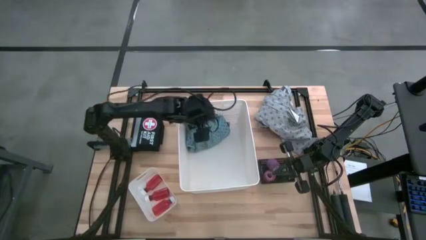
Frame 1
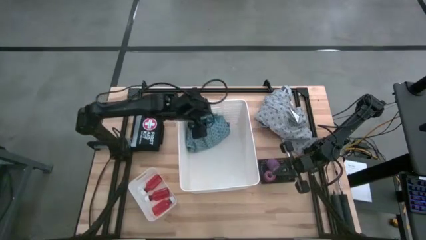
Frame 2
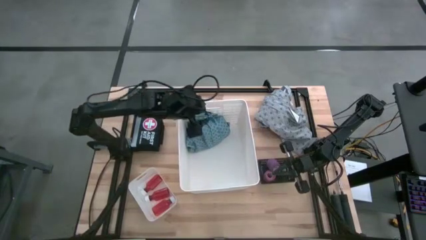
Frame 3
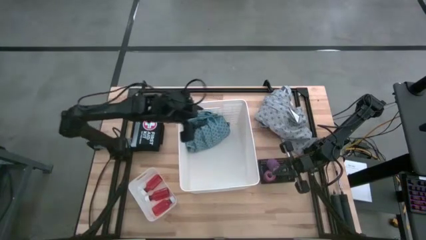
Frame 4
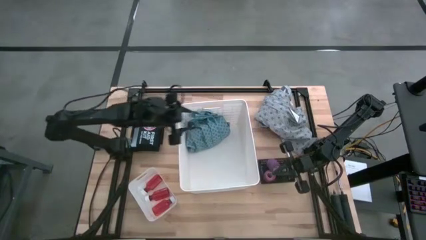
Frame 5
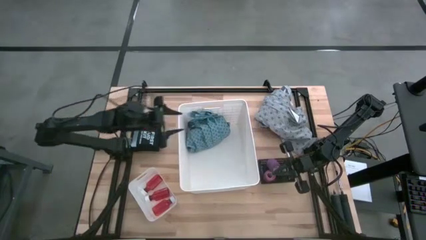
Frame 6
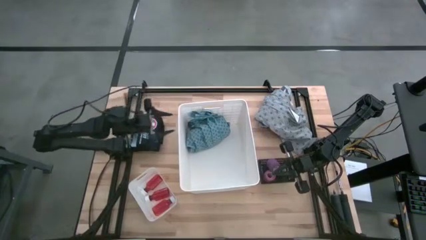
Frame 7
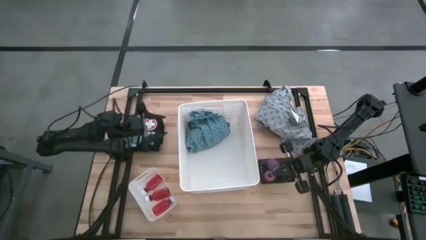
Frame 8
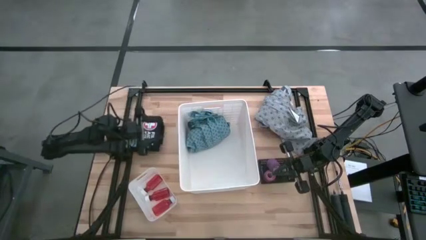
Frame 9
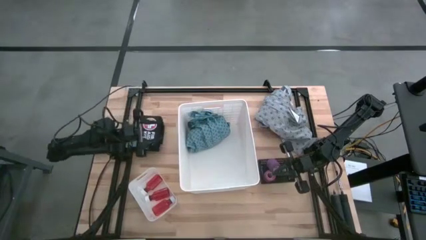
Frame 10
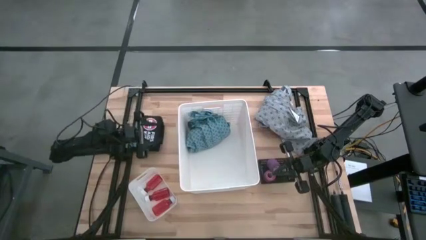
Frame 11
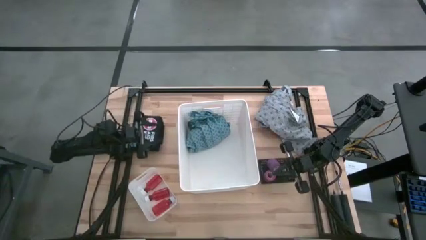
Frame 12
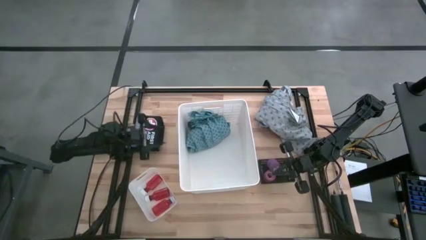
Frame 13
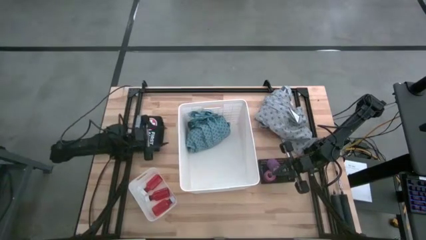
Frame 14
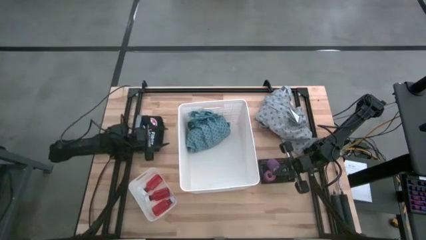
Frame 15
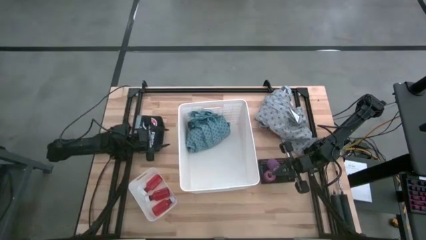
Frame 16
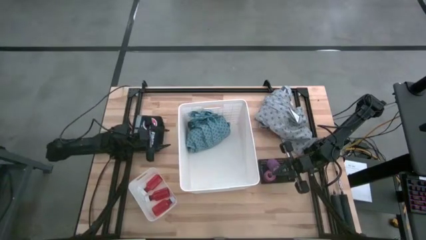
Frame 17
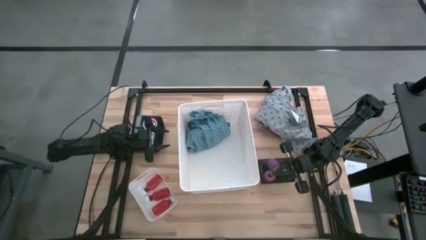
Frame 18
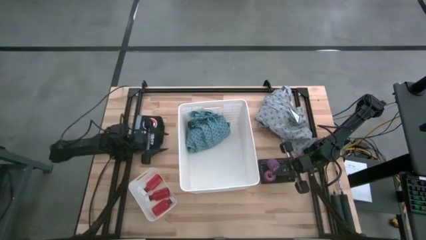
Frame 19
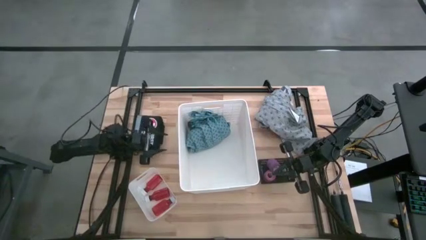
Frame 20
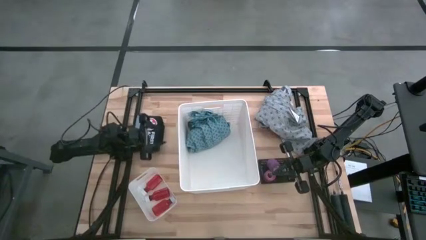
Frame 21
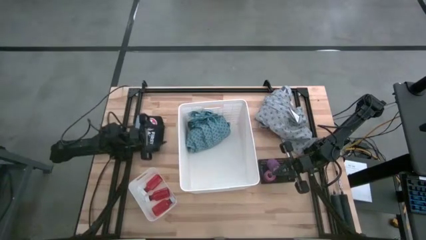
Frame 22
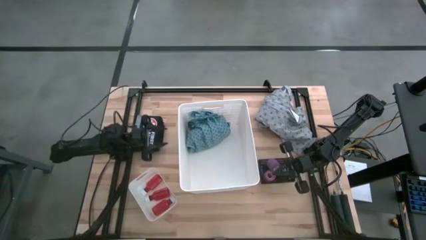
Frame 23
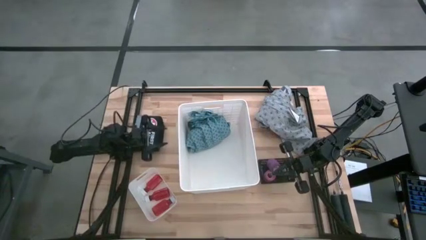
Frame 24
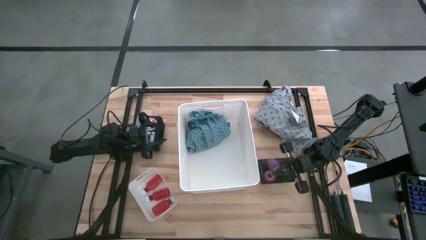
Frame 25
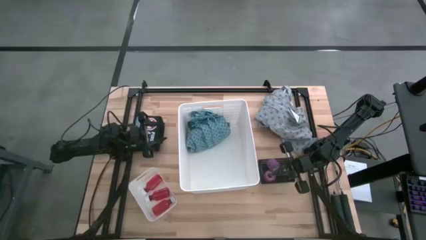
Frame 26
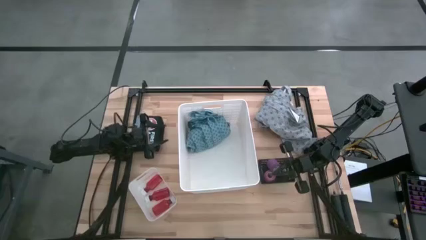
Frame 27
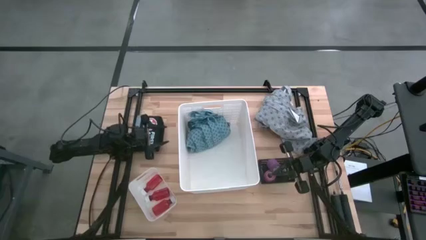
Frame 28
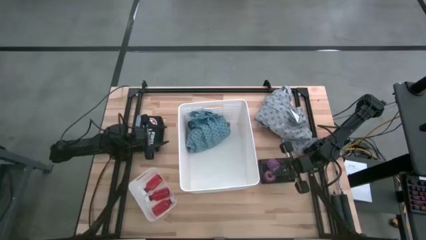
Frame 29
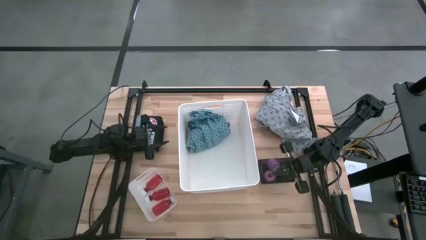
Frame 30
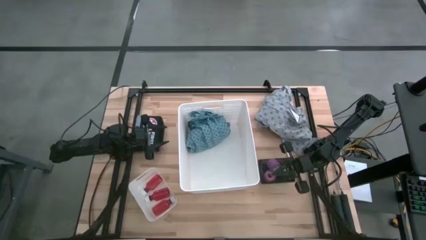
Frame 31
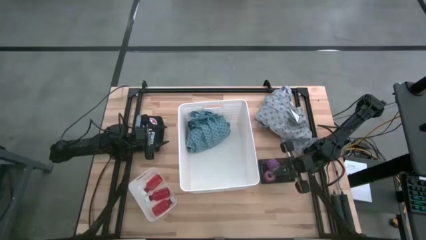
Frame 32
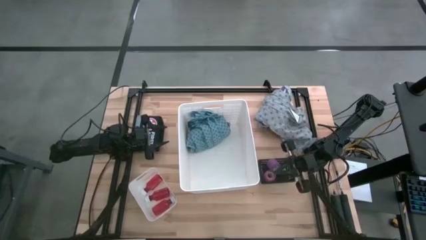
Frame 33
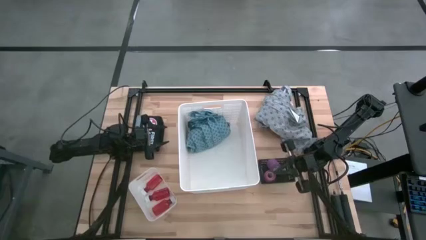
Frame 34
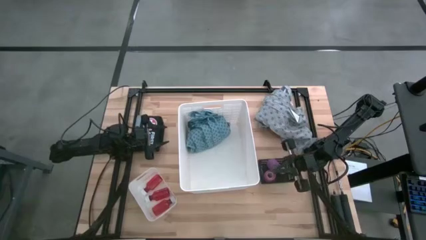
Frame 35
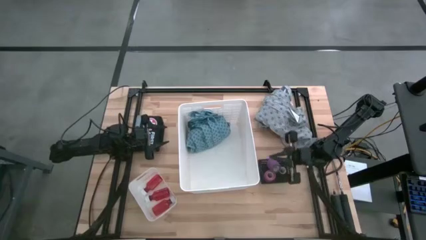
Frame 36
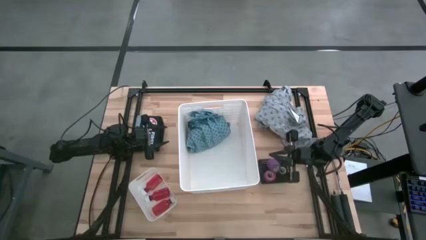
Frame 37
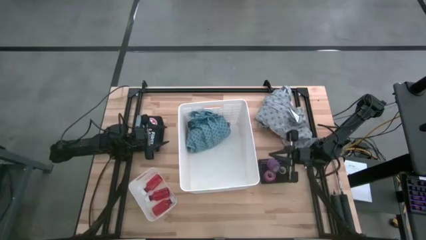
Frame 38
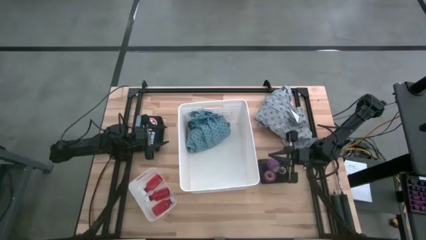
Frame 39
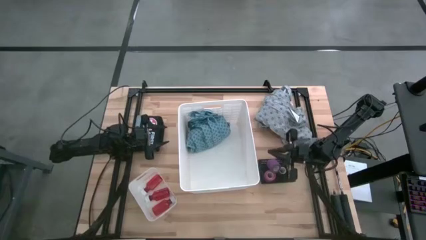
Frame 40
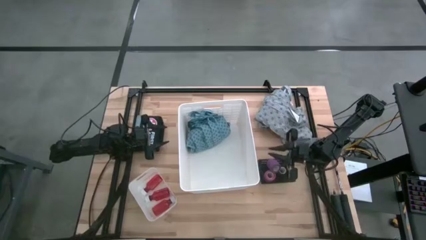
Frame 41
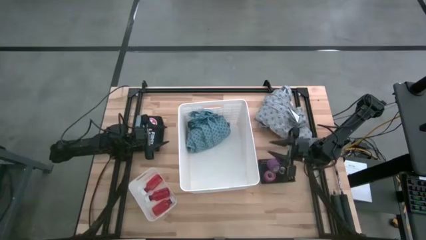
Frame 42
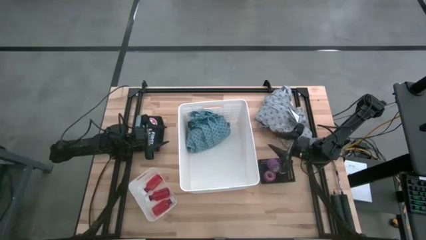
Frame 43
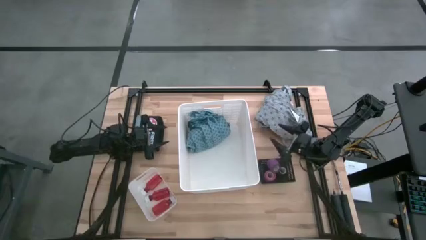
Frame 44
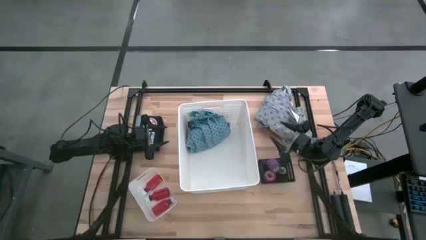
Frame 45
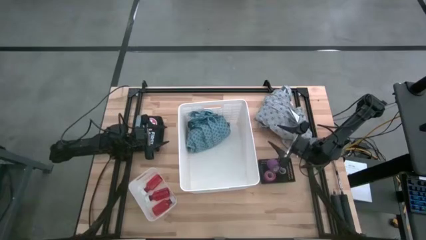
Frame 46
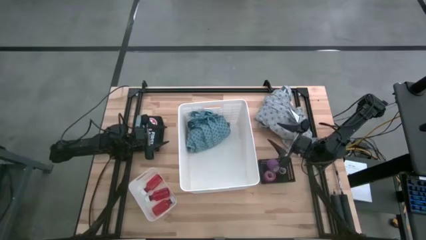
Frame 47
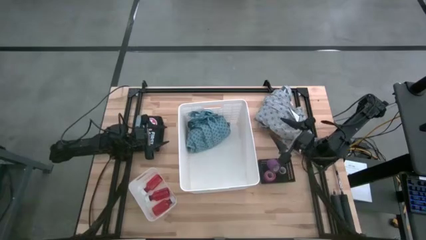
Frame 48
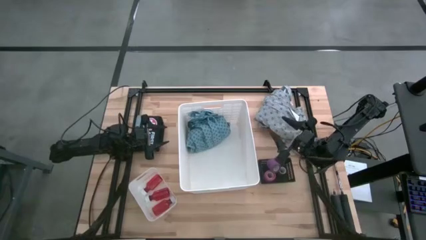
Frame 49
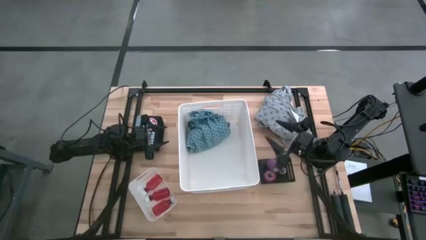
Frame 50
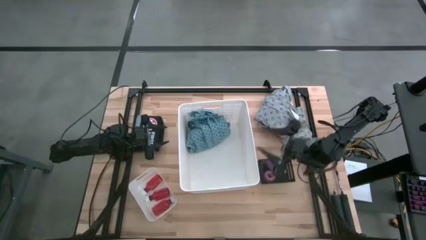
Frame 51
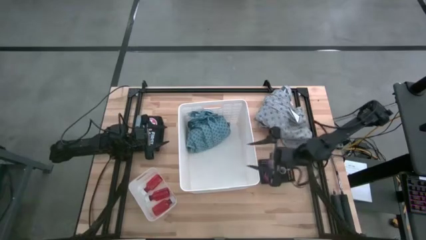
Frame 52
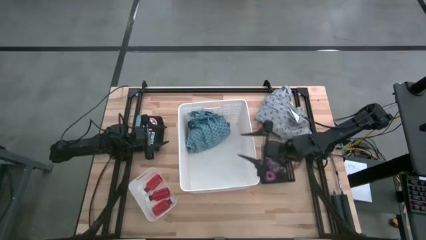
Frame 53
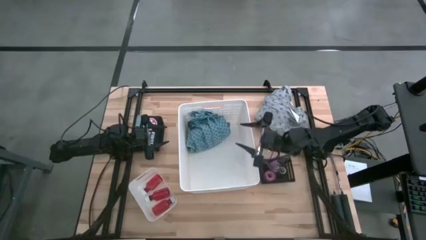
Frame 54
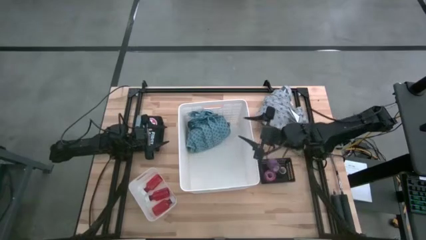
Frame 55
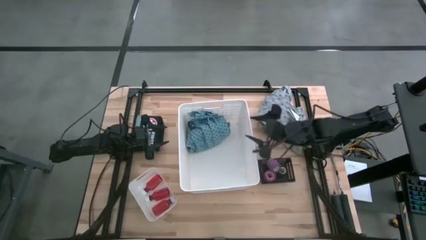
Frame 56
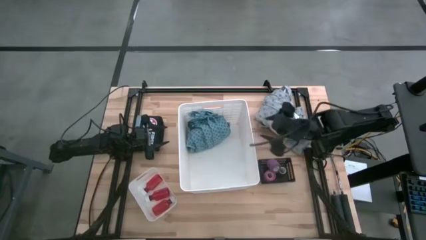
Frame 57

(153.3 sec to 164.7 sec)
Task: Pick & place medical supplies in basket/bin
Put the light blue patient gown into the organizer bin

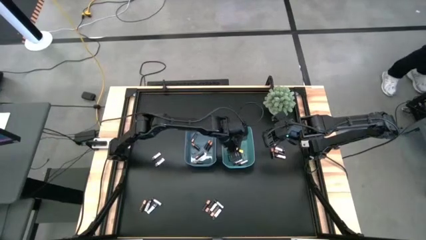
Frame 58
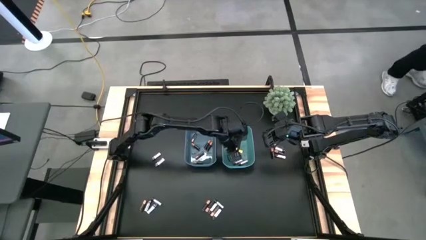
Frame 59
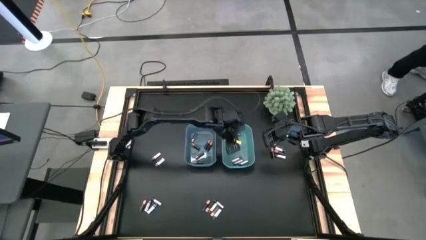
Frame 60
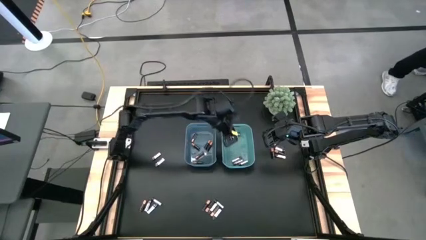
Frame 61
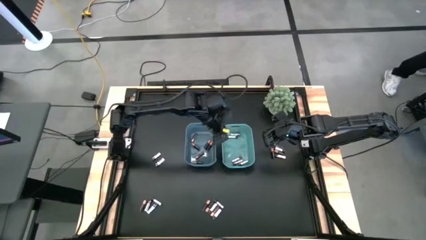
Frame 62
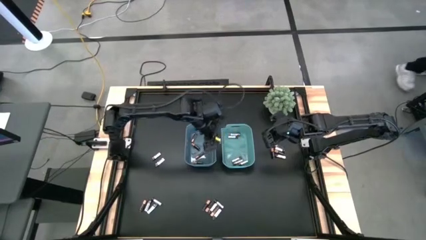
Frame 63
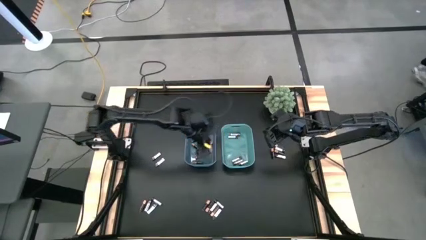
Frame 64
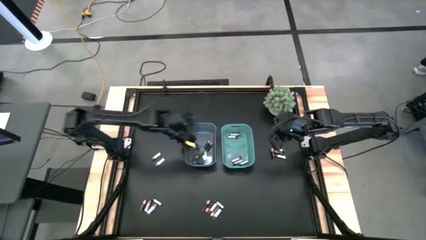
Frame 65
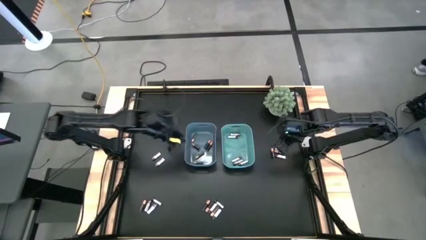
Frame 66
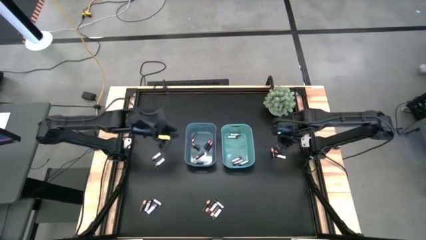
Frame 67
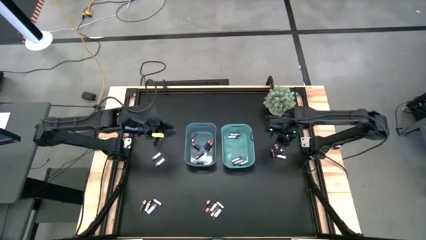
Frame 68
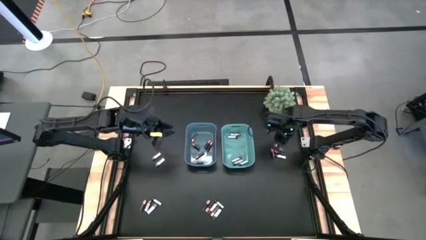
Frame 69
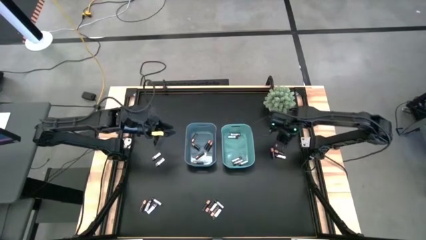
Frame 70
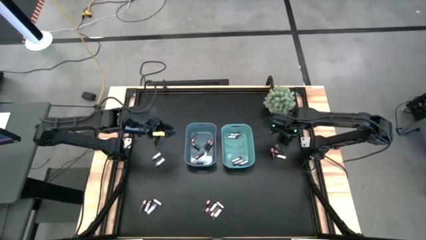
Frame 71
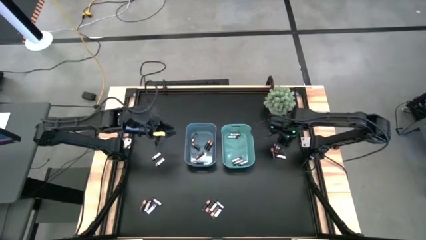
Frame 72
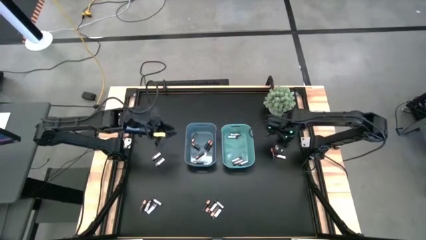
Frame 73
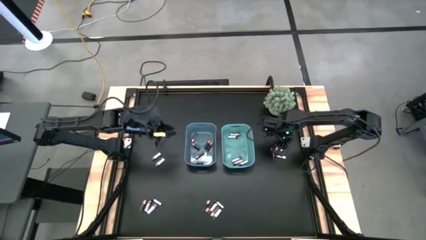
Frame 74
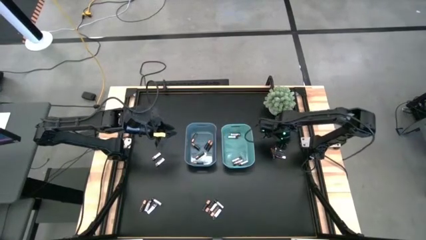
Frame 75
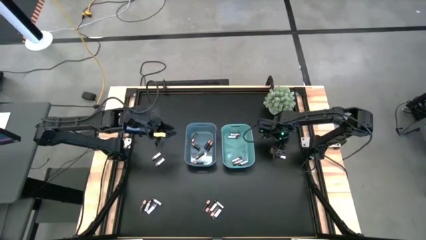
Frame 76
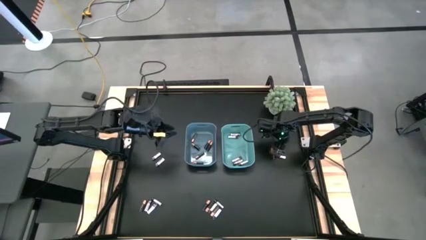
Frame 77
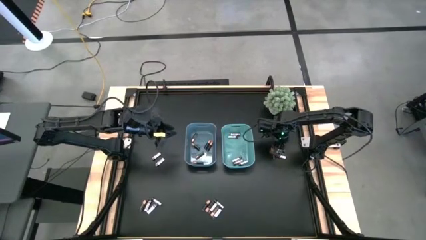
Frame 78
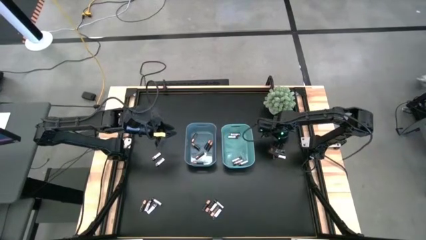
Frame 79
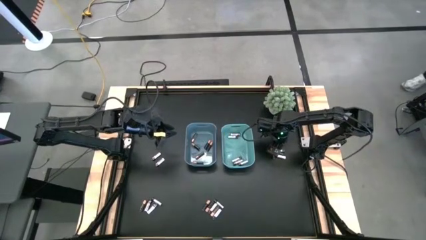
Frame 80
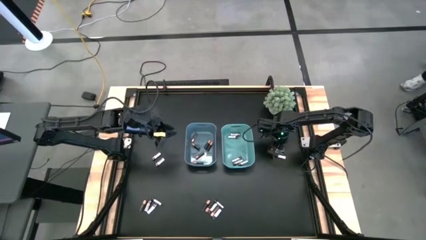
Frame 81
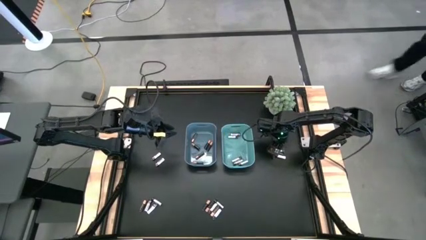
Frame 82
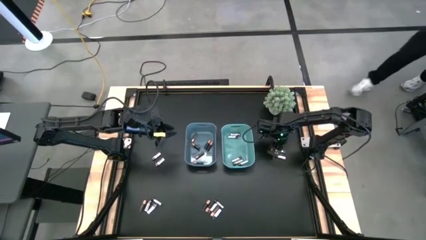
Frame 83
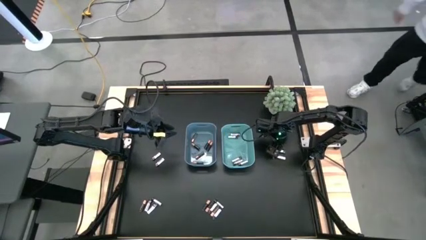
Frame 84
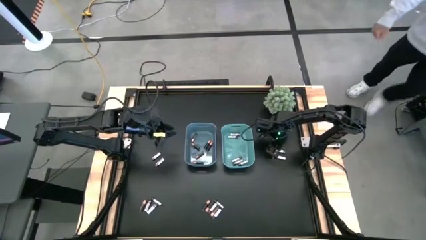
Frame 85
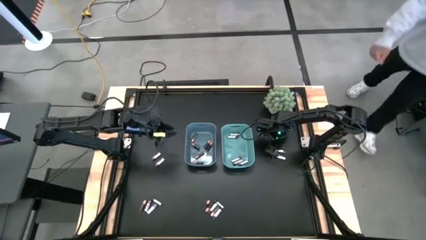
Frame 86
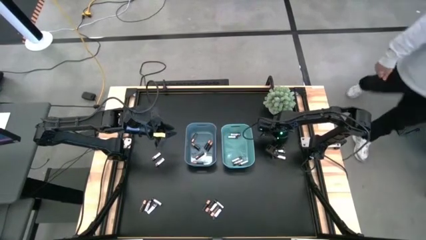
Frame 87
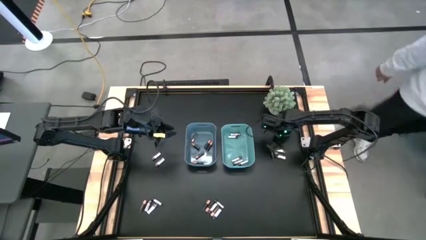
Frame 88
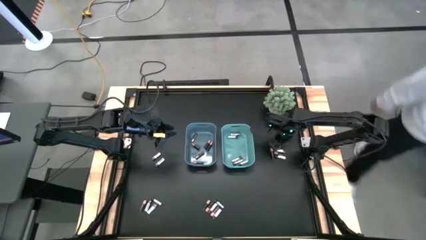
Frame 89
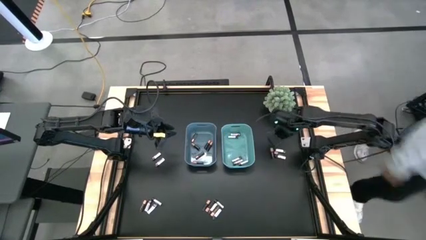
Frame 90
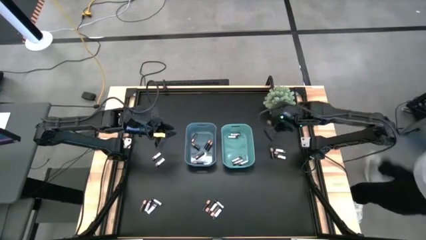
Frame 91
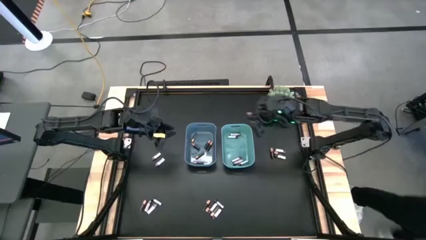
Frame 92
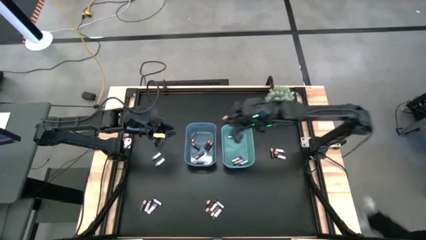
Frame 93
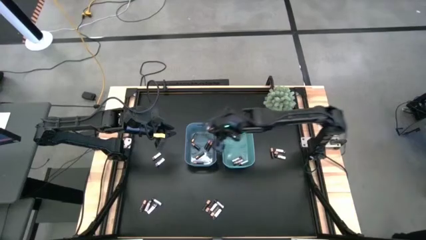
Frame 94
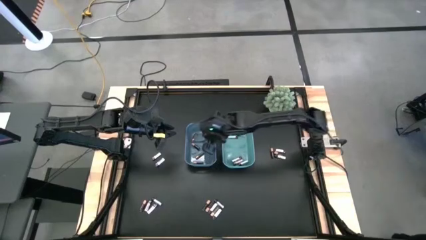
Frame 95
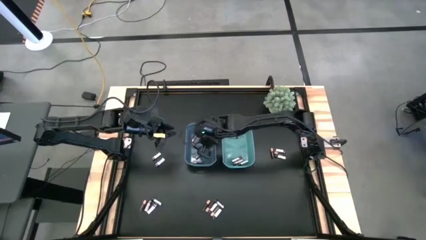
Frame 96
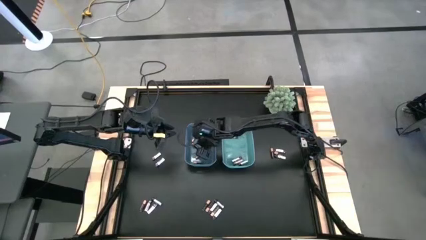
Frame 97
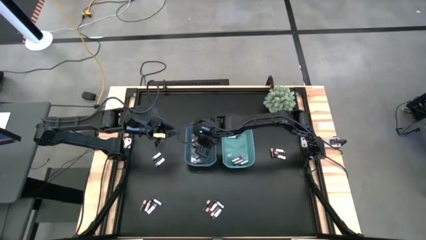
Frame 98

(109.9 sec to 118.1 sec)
Task: Sort batteries
Put the black battery into the blue bin
